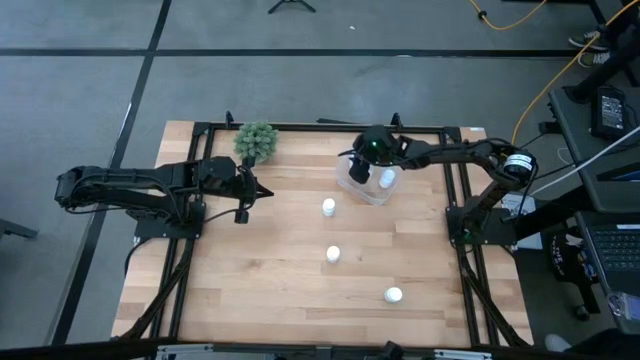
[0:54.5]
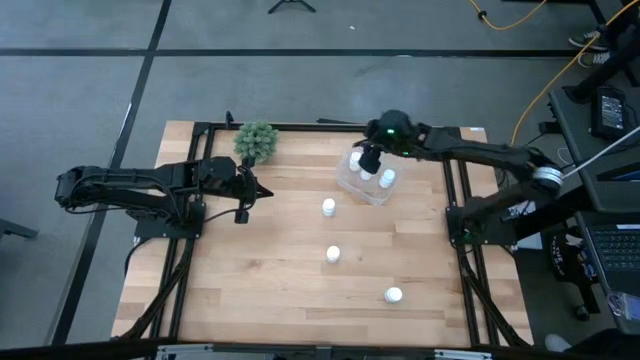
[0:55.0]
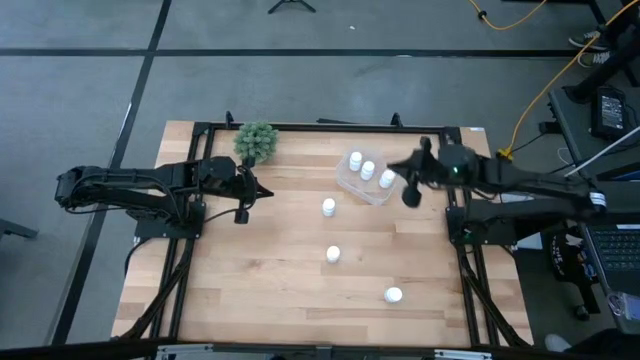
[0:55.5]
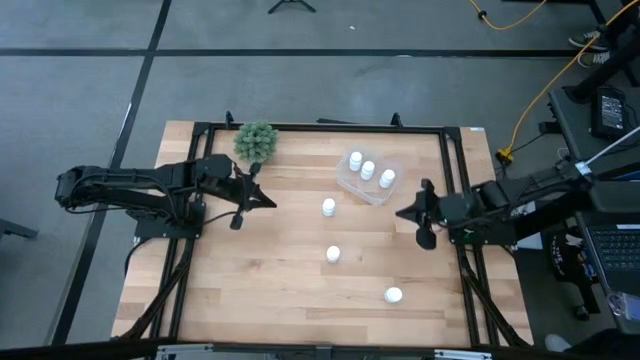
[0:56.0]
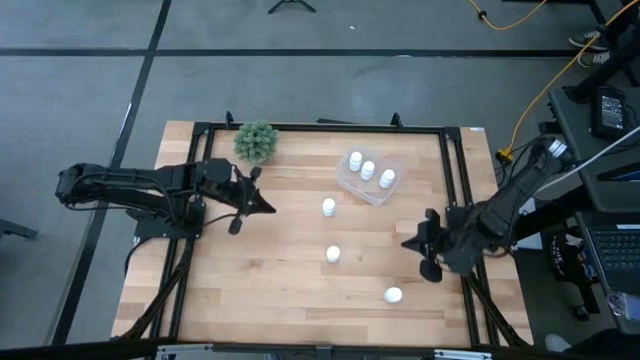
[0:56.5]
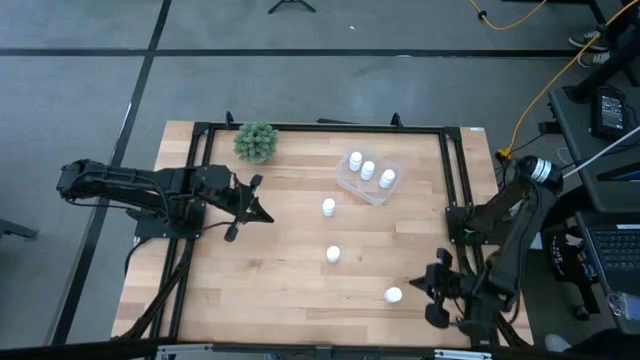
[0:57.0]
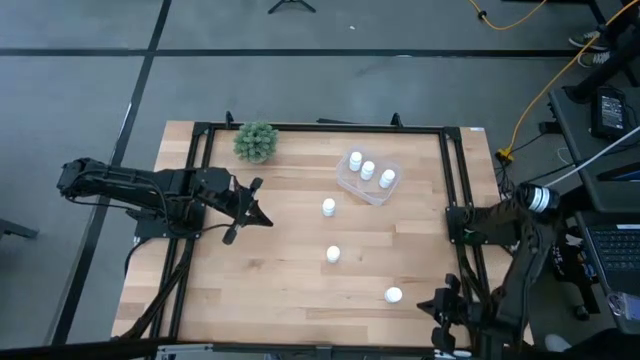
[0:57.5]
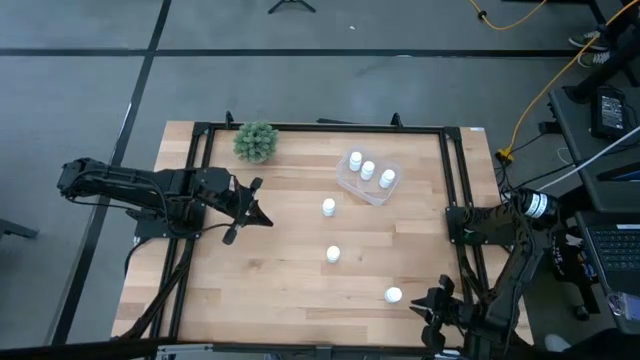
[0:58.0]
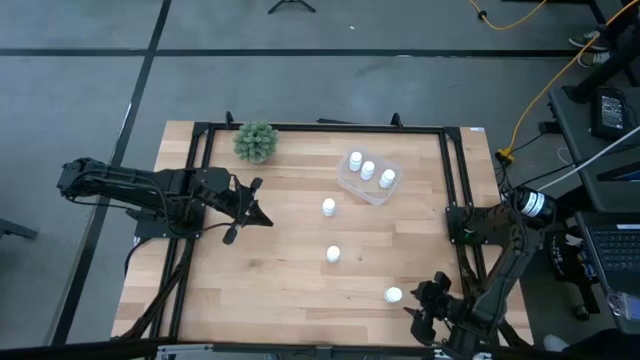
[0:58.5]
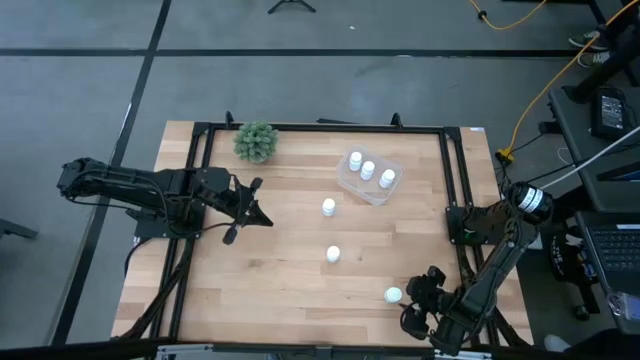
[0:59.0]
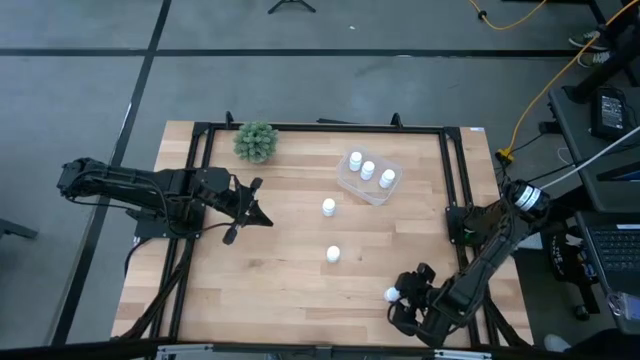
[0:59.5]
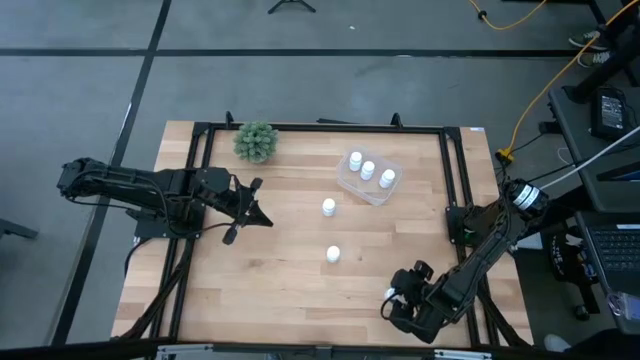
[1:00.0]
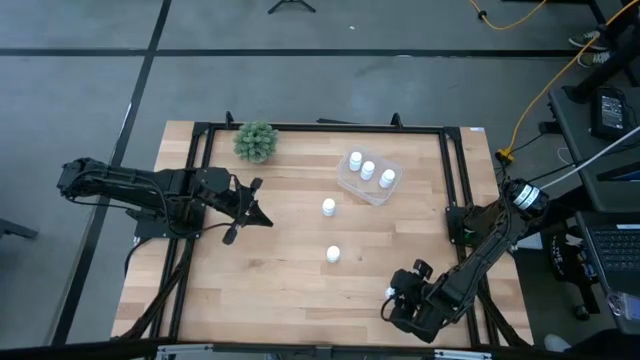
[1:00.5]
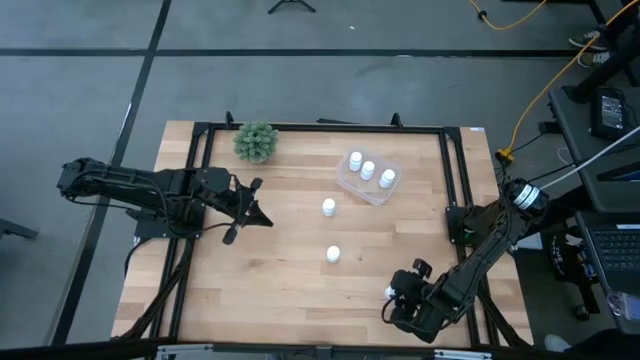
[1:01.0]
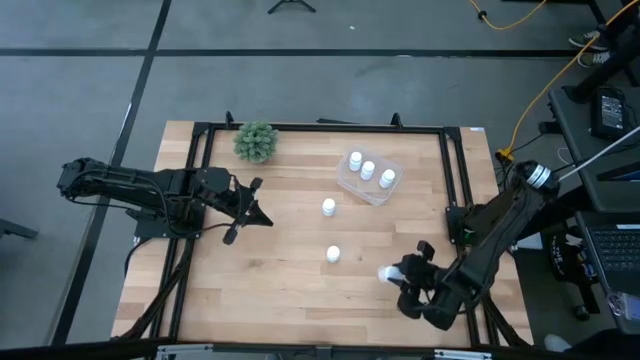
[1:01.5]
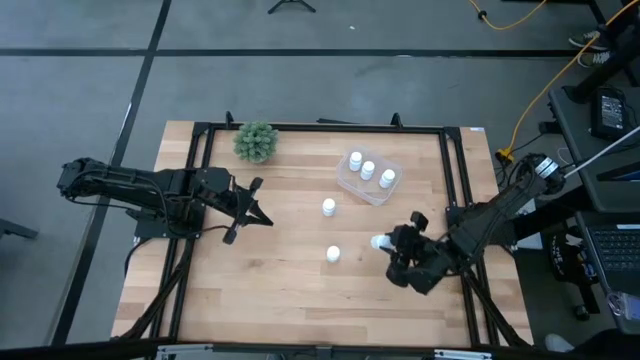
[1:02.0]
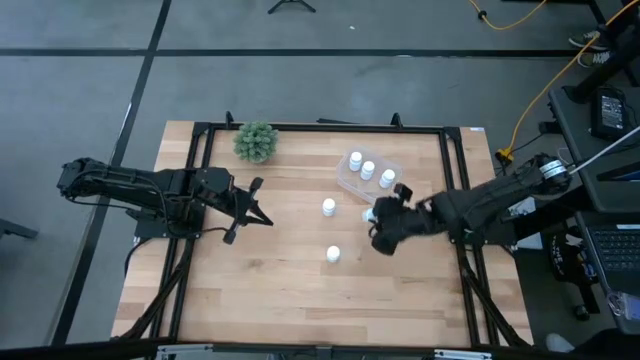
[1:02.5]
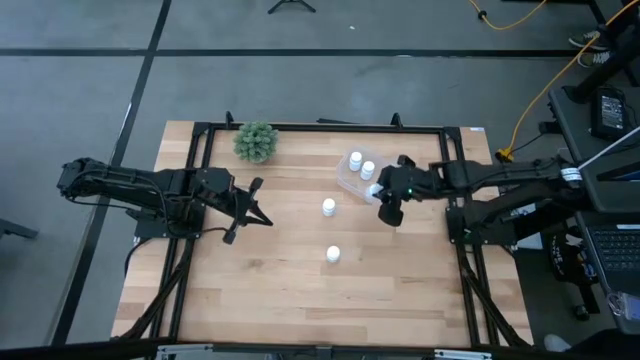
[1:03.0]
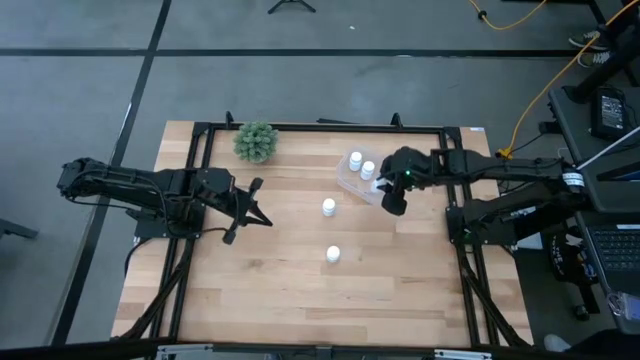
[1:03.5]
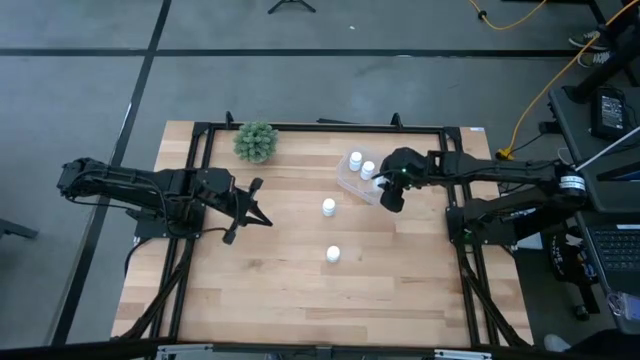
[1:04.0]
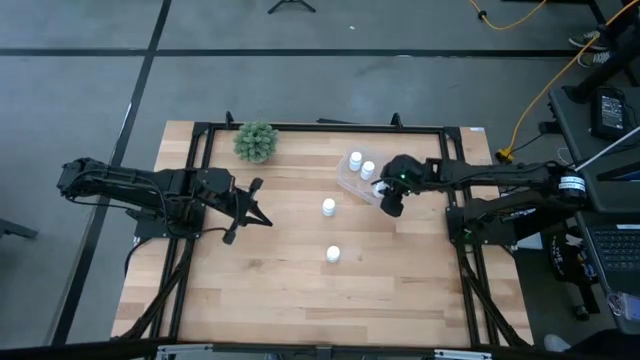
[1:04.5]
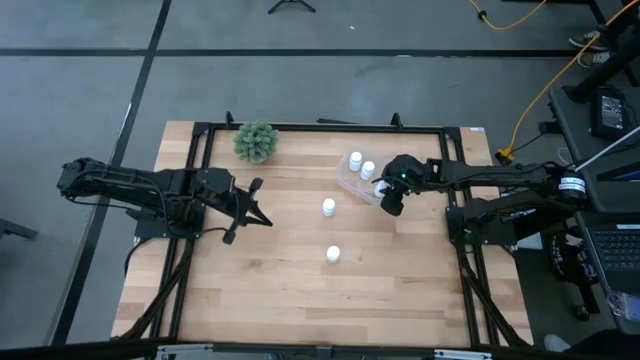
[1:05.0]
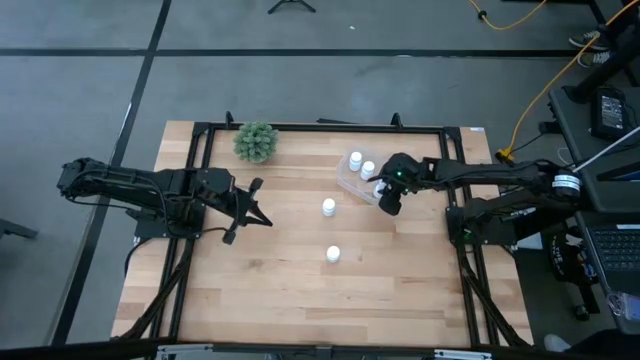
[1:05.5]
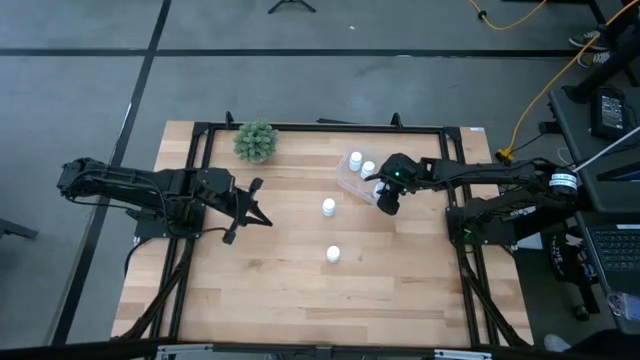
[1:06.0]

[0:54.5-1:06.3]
Task: Pick and place pill bottles into a basket
Put the white pill bottle into the transparent bin

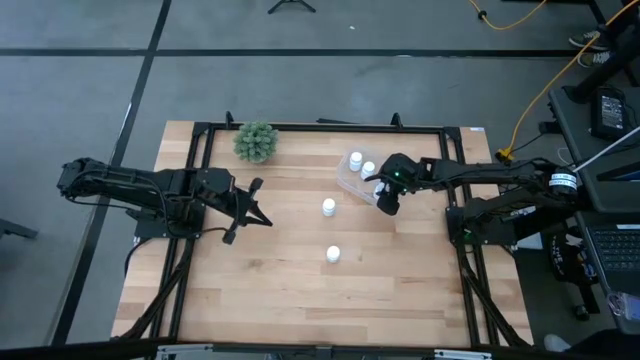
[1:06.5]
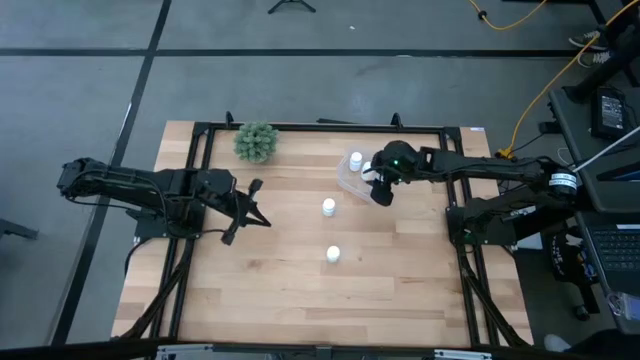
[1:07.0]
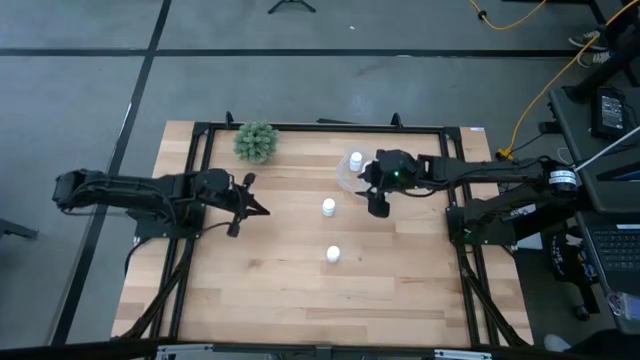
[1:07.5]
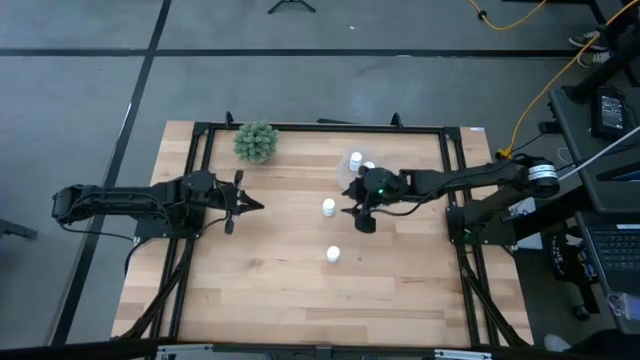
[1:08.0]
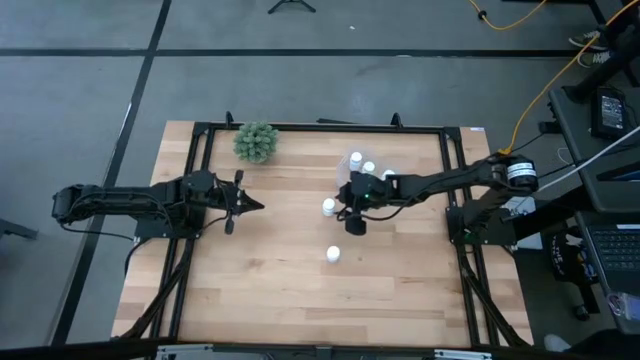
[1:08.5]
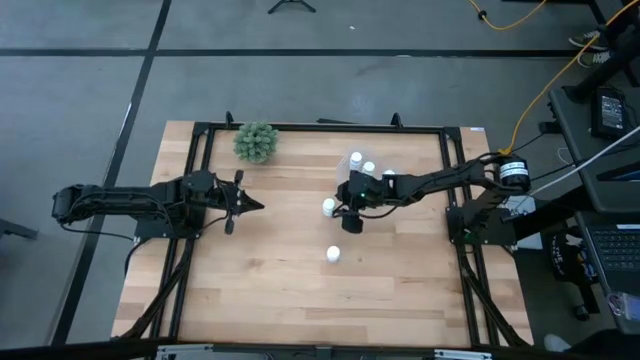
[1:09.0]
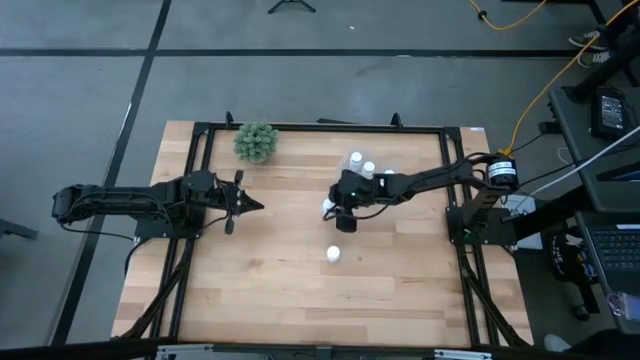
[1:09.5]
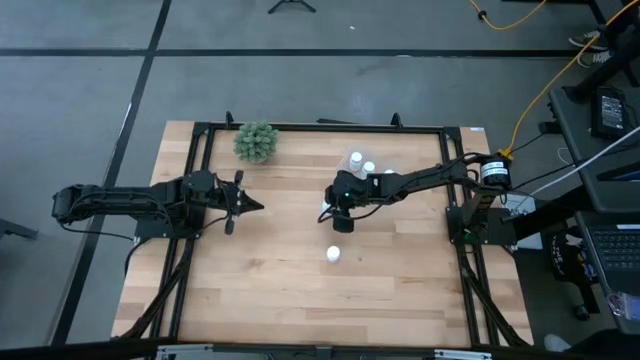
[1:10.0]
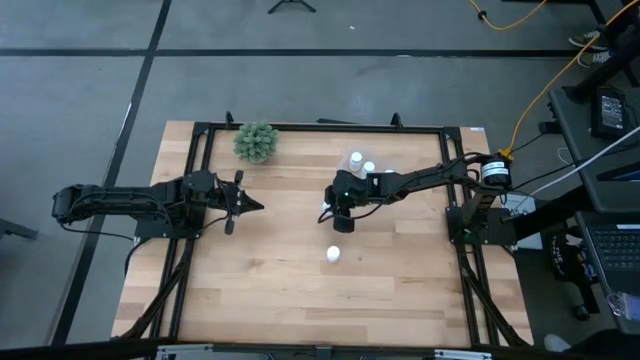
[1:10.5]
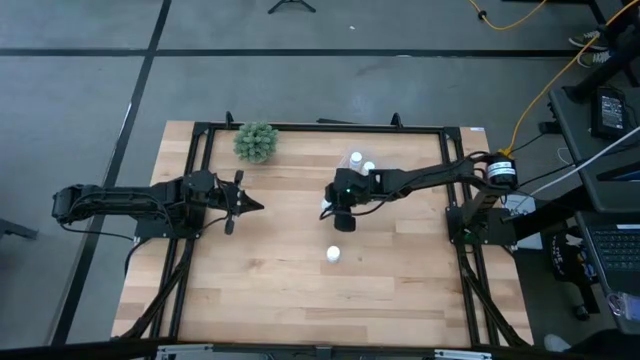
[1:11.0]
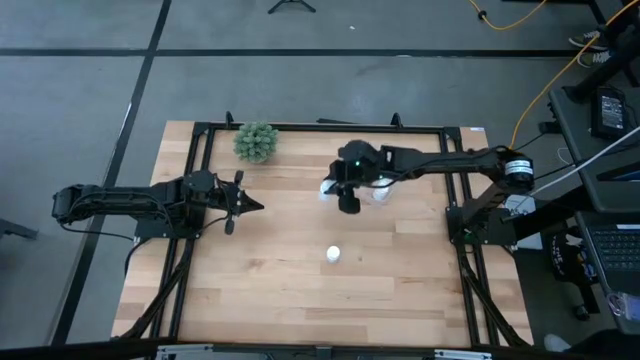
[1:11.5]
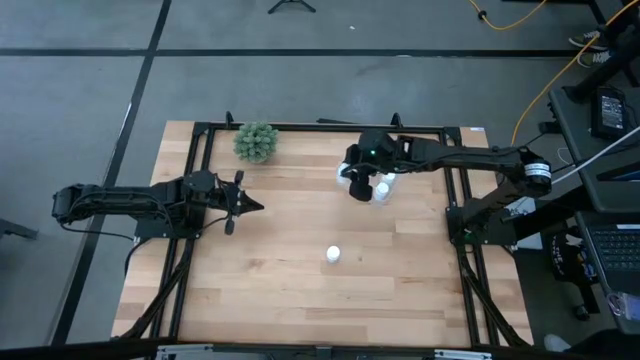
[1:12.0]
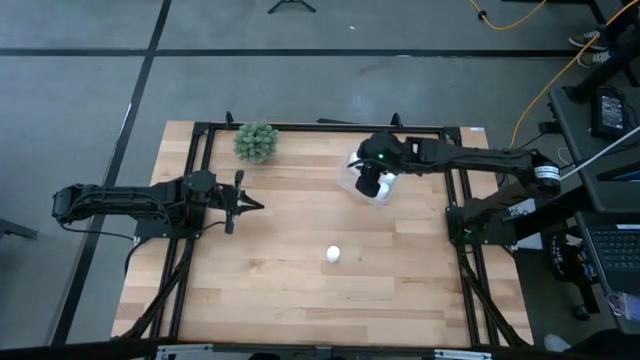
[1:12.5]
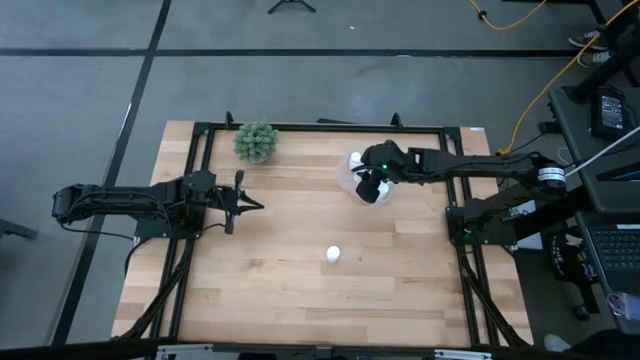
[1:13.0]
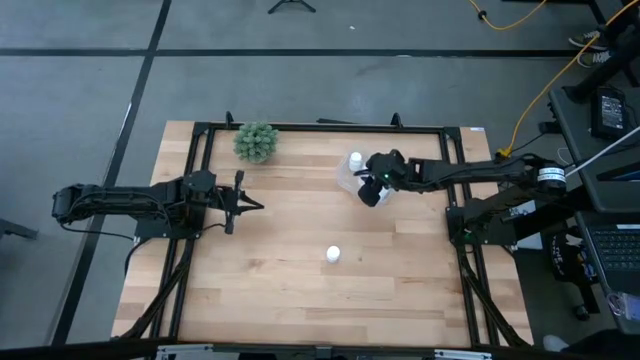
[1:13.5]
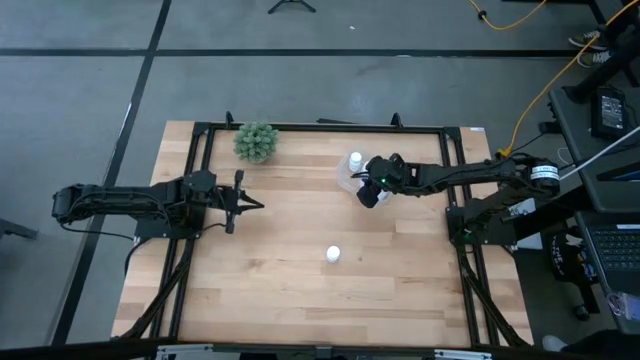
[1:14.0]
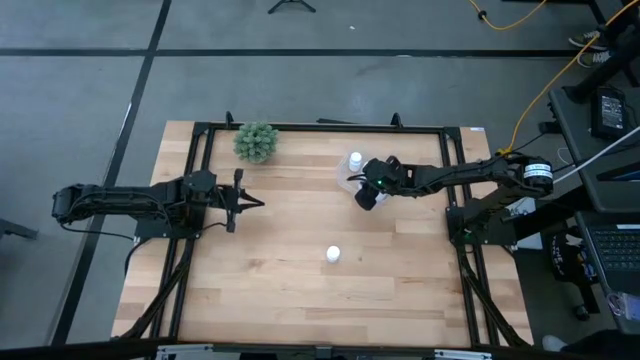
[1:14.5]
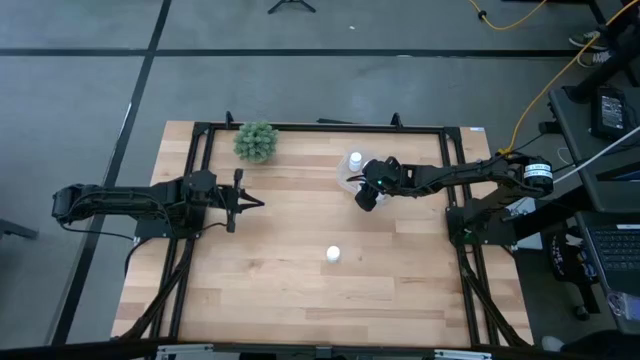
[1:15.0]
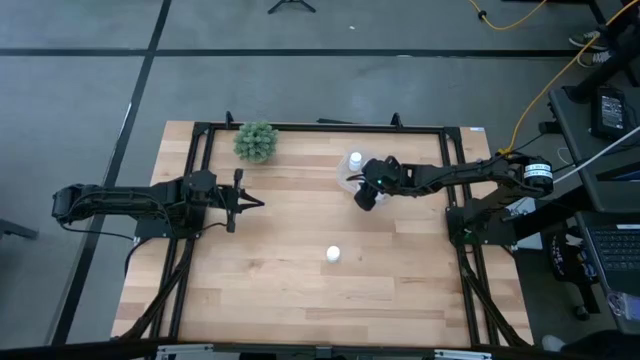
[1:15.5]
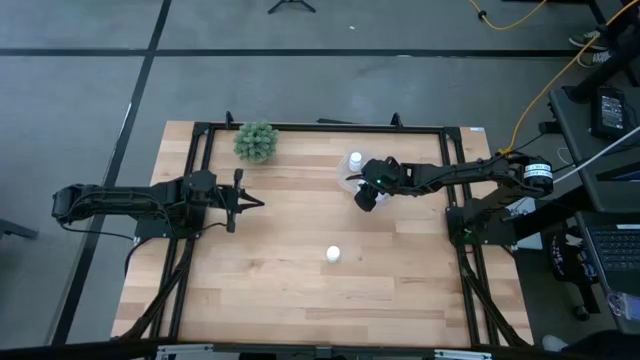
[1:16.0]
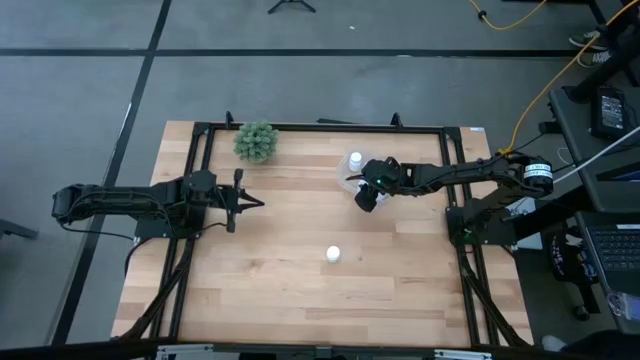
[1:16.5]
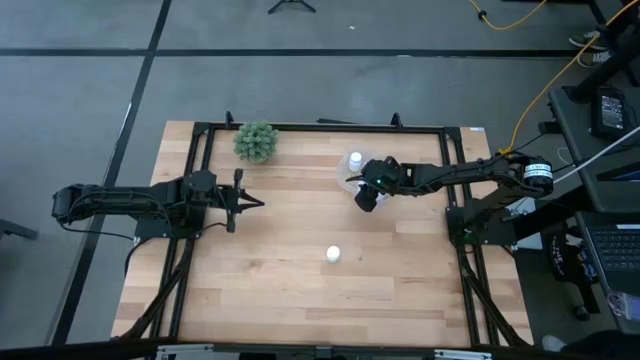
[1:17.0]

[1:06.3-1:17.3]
Put the white pill bottle into the transparent bin
